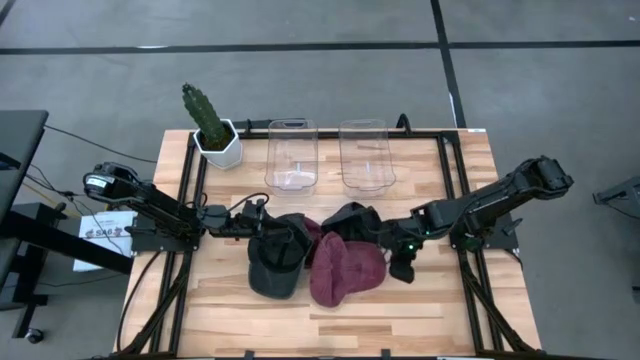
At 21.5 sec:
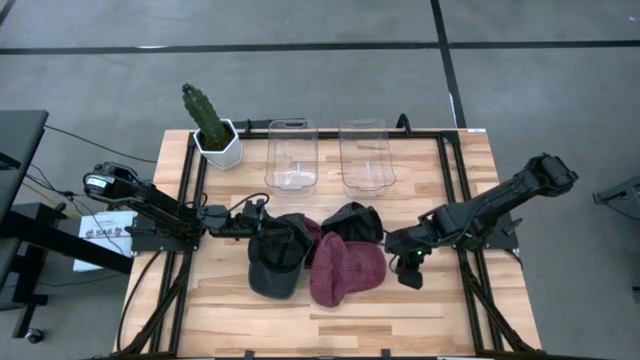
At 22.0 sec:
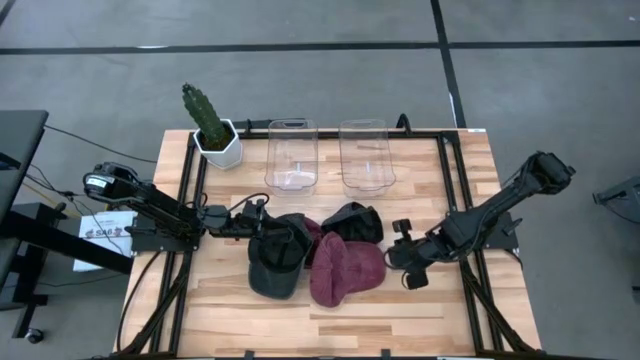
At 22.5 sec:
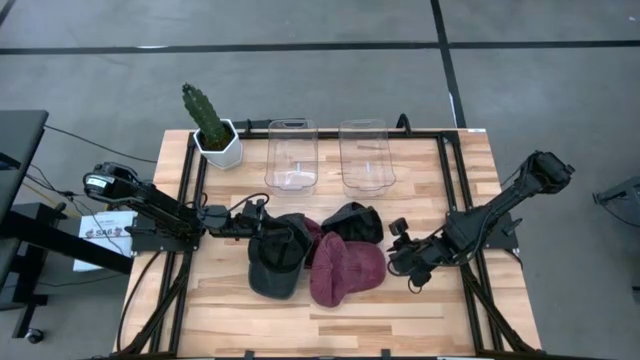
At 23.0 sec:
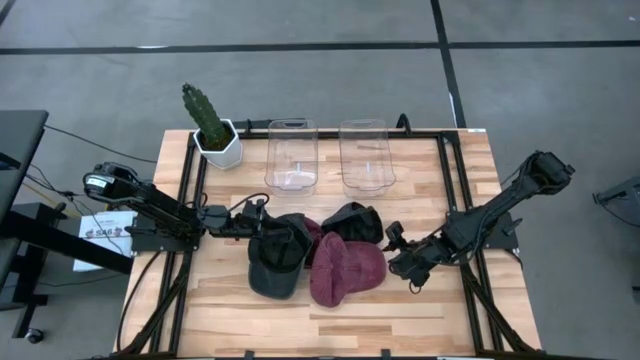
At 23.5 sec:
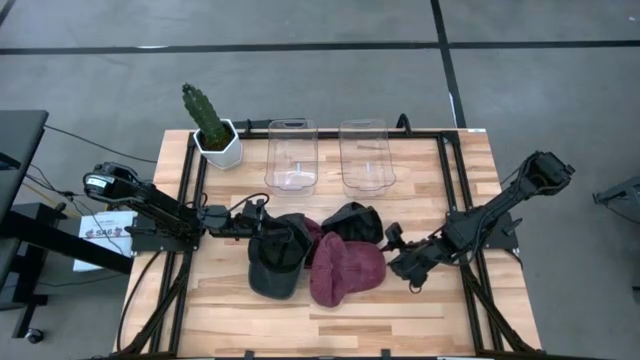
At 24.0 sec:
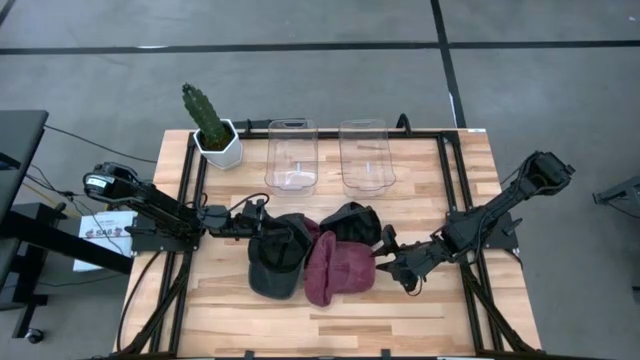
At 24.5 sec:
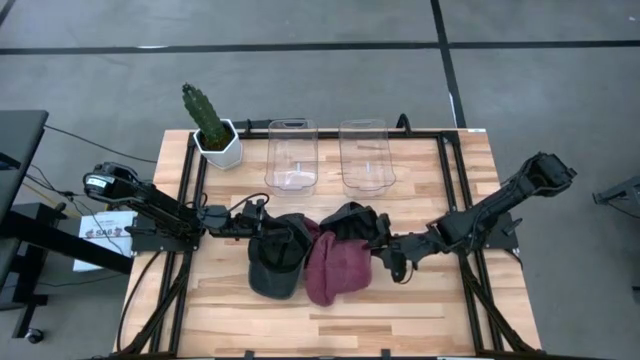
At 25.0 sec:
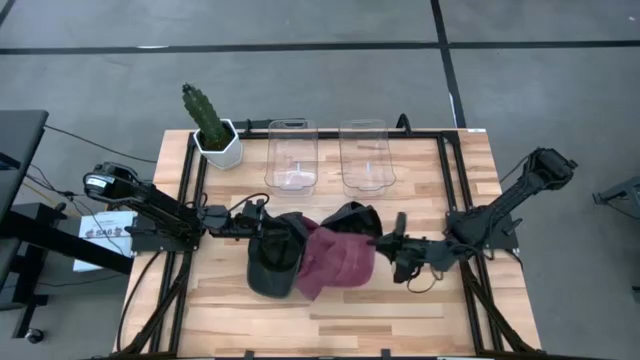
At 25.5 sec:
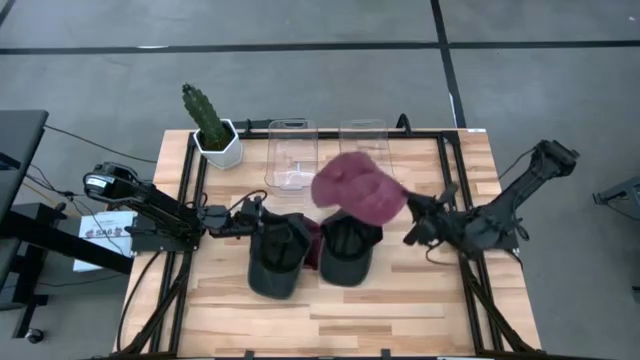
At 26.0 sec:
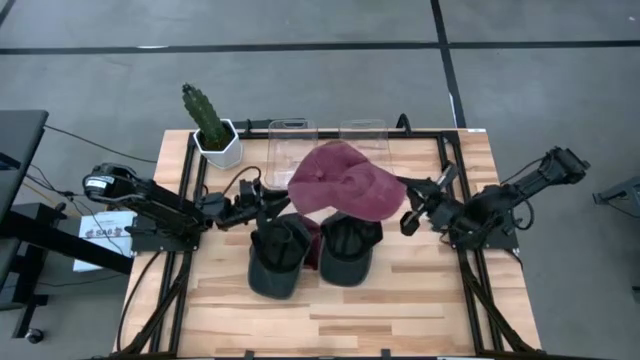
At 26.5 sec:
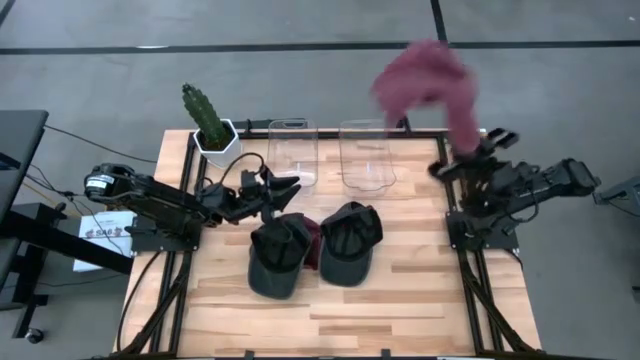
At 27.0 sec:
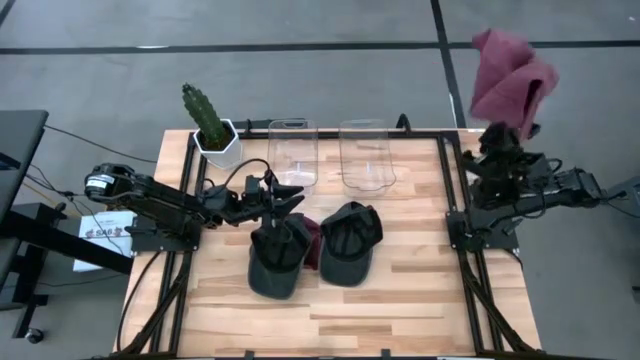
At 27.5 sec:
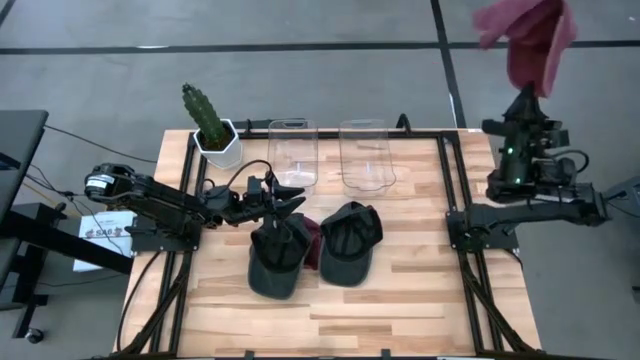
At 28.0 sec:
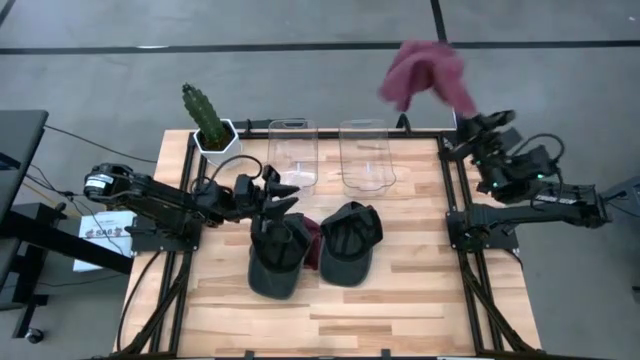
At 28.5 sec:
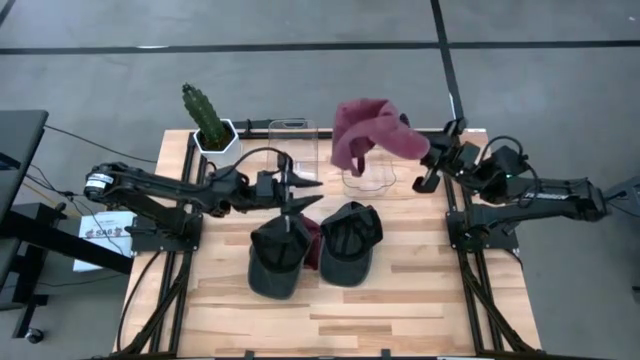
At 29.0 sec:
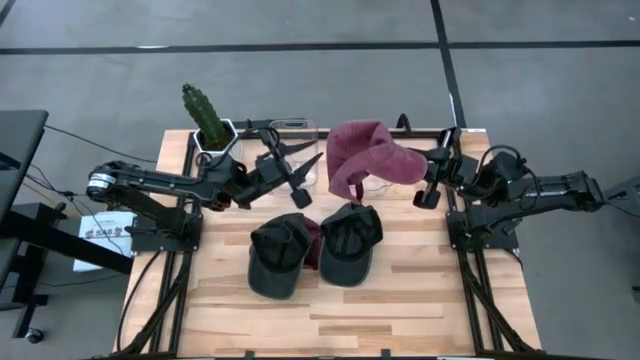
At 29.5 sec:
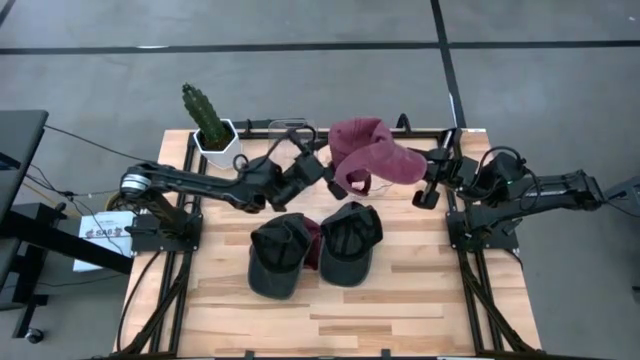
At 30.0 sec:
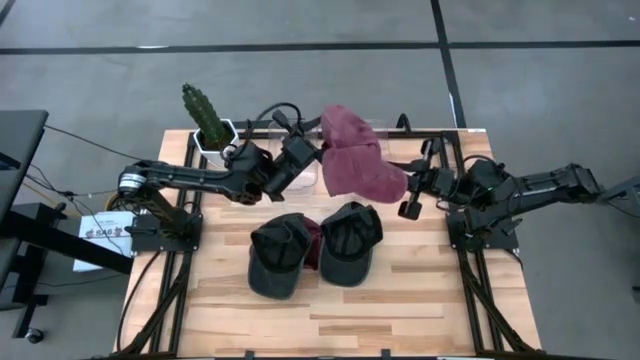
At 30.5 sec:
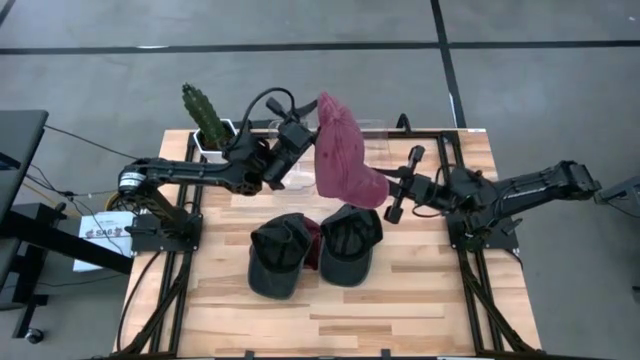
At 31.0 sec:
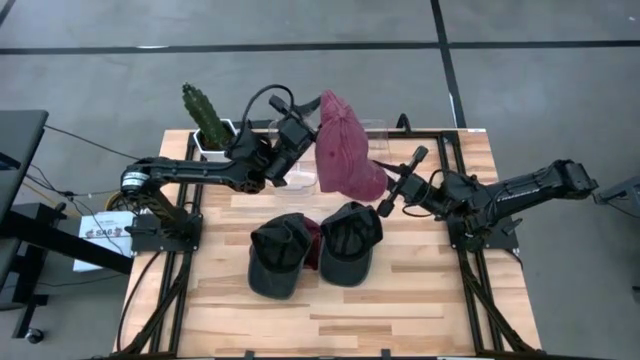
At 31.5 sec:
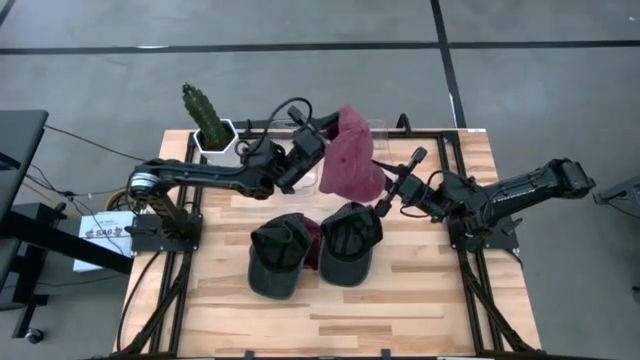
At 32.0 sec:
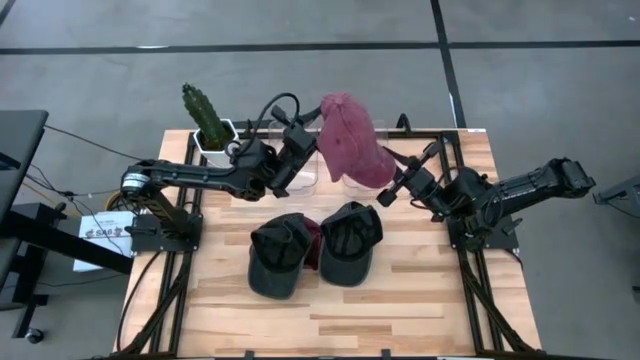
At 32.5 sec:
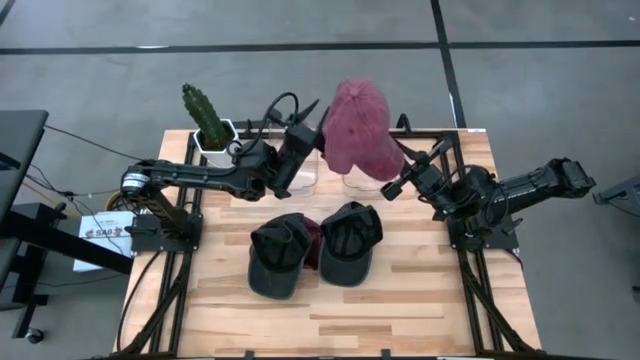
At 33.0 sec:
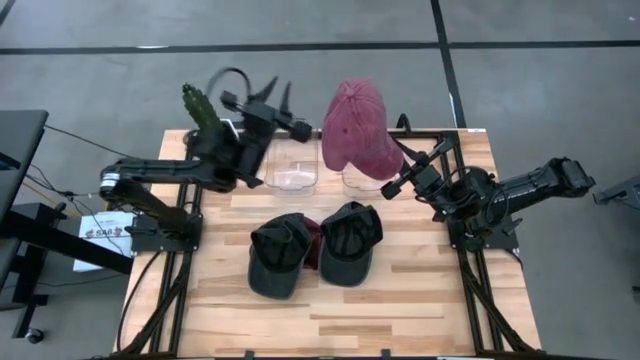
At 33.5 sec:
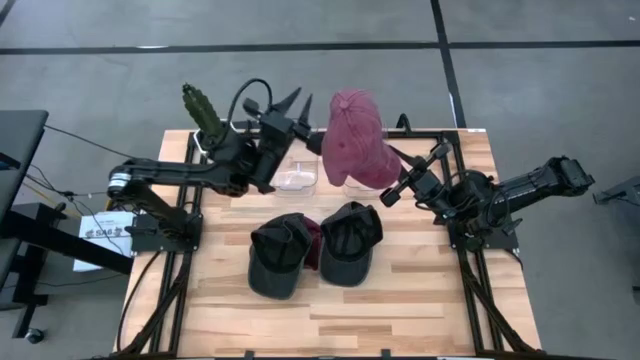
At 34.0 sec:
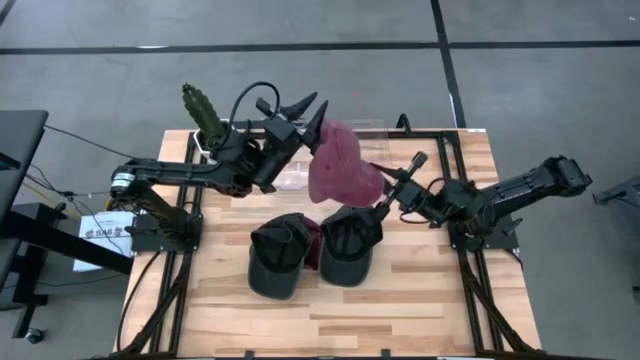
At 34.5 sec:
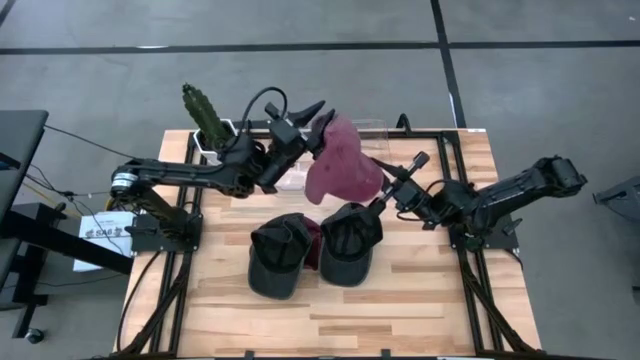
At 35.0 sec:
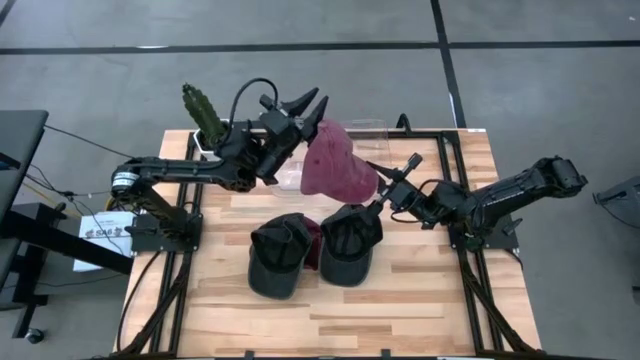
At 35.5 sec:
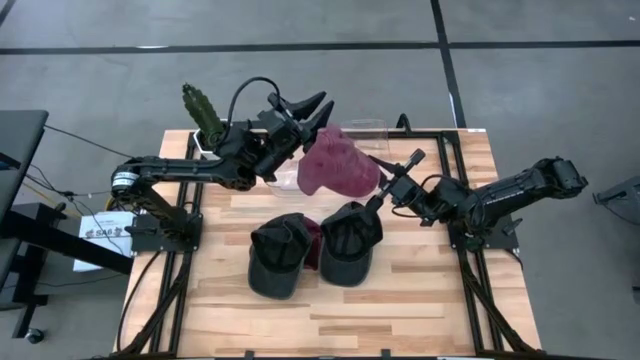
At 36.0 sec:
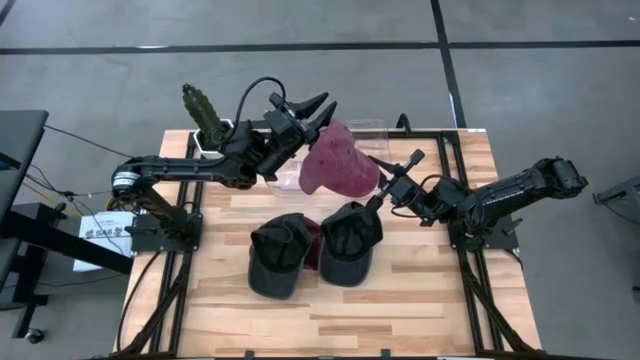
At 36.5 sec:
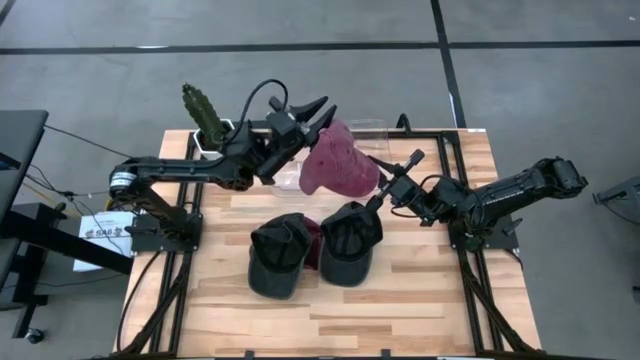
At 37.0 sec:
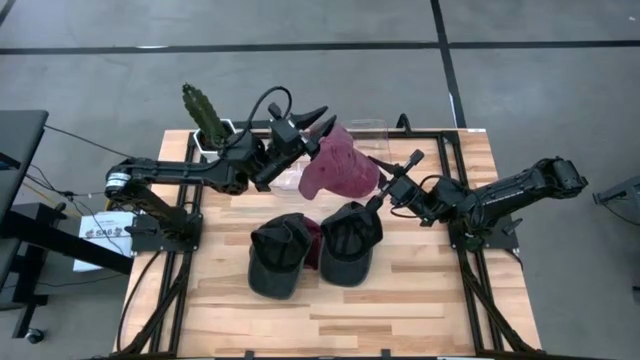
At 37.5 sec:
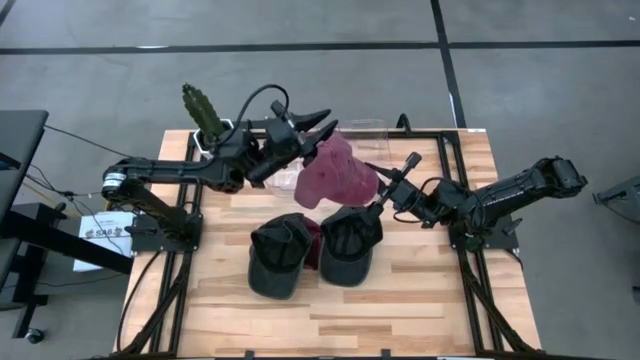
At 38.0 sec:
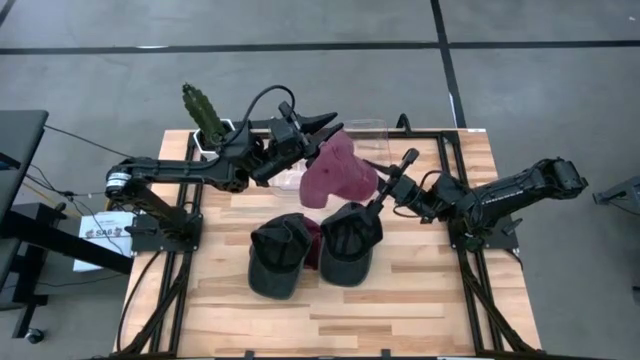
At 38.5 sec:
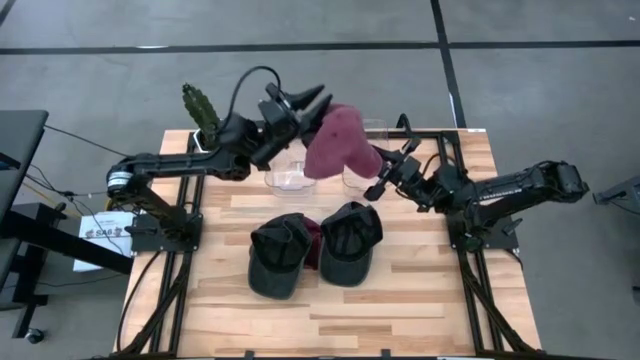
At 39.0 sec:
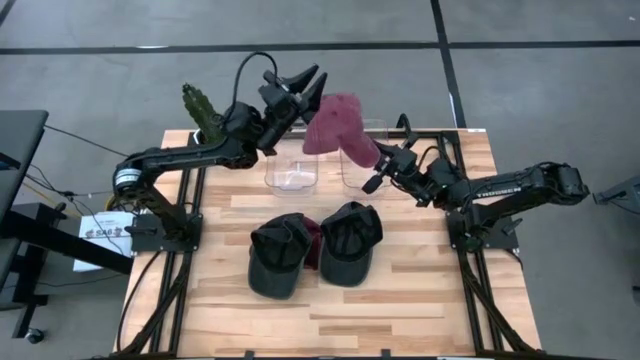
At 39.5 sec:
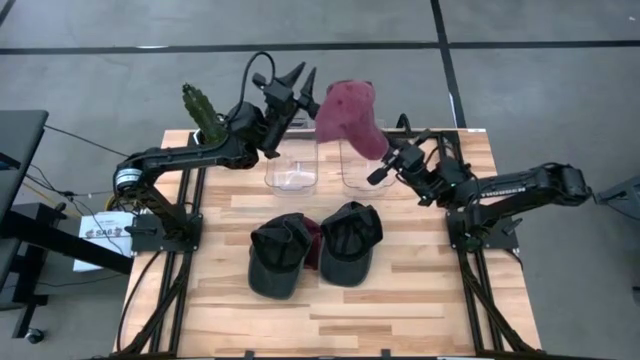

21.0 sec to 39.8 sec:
Task: Pick & Place hat
Put the right red cap into the right transparent bin
